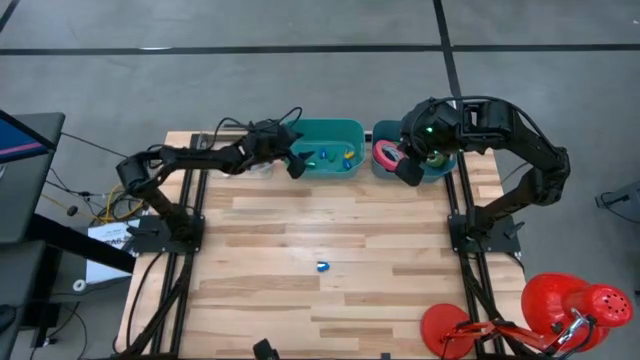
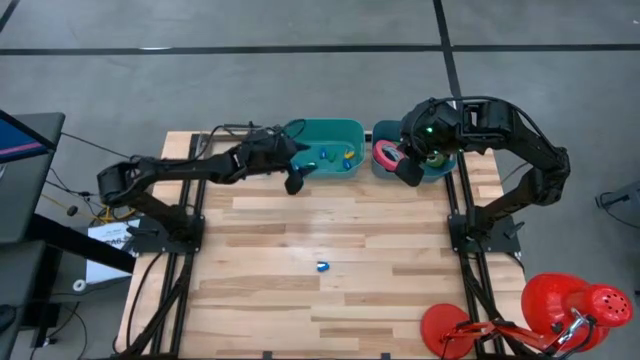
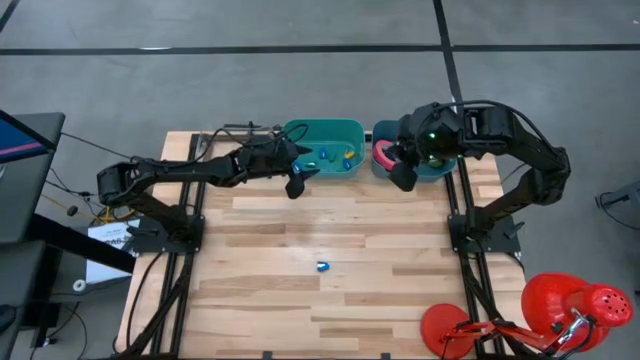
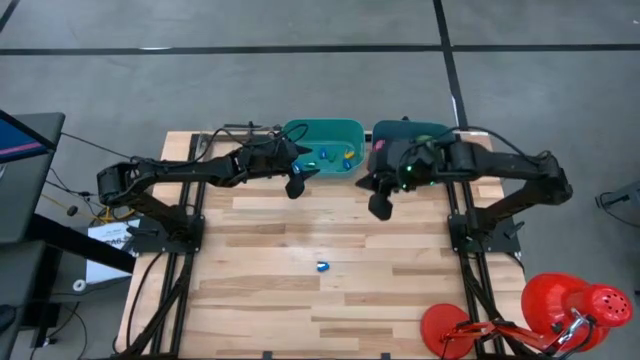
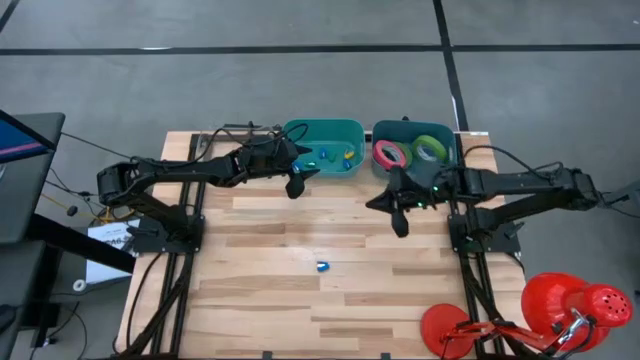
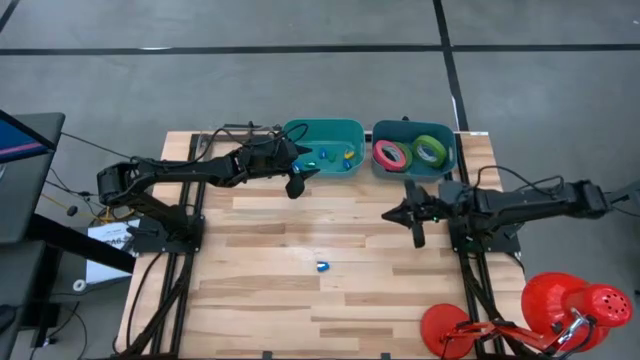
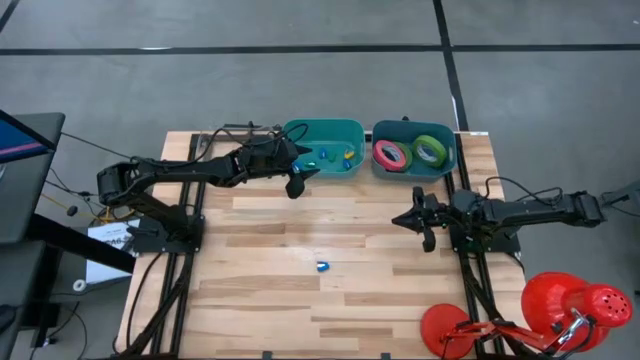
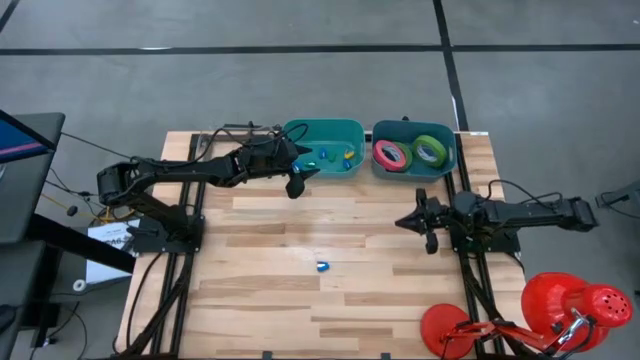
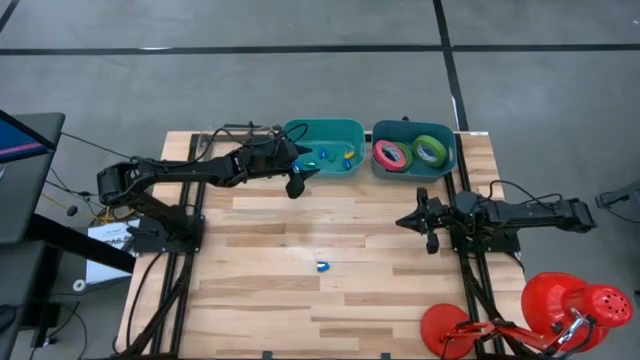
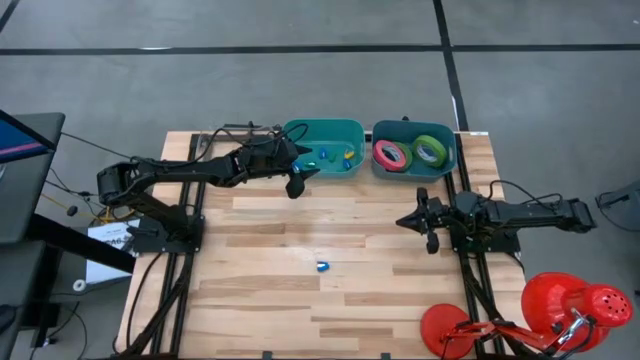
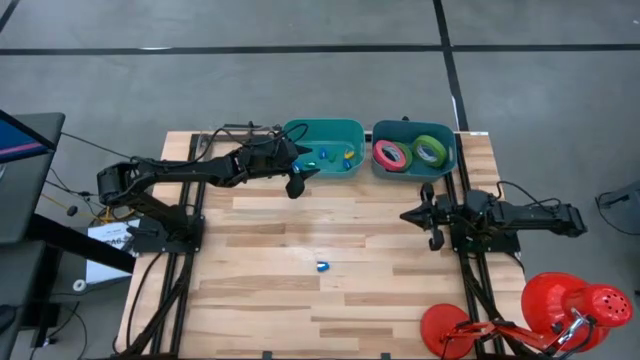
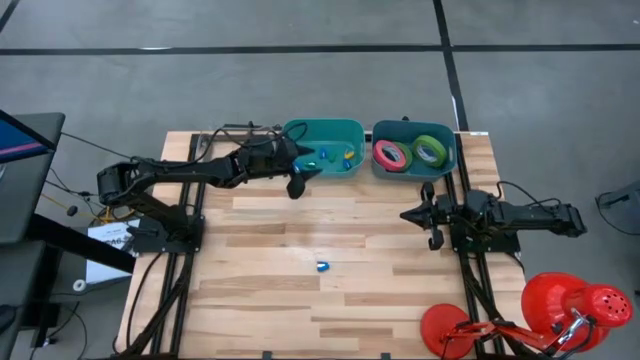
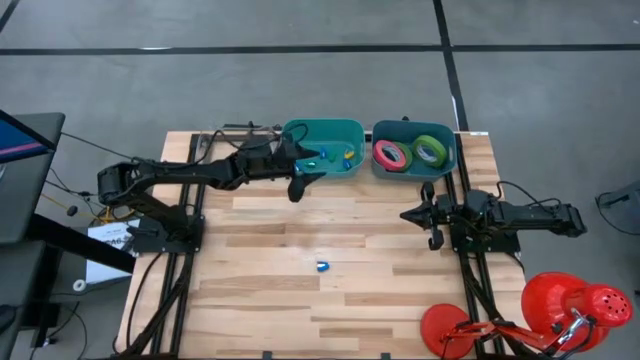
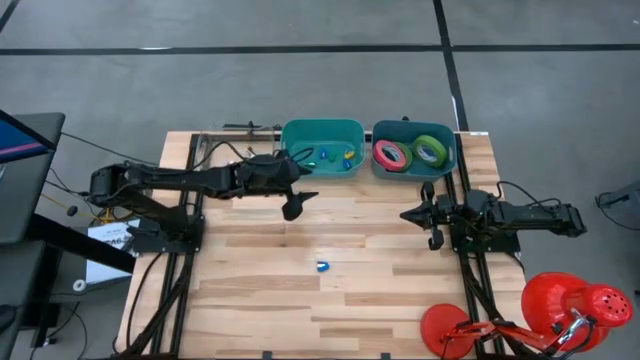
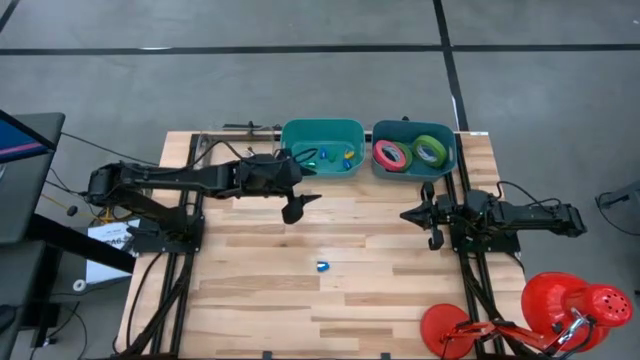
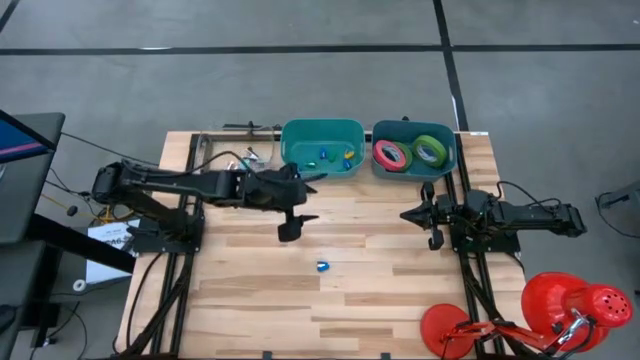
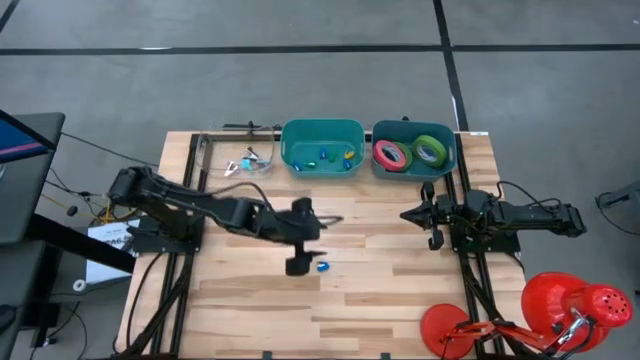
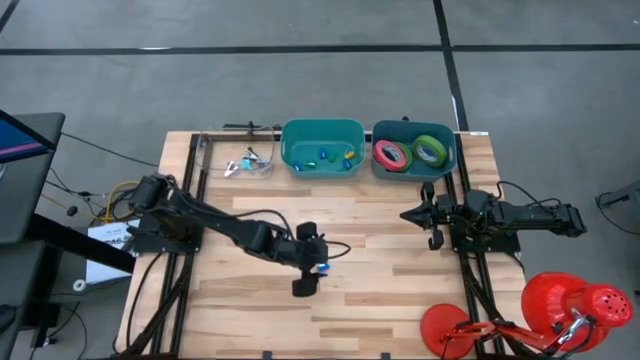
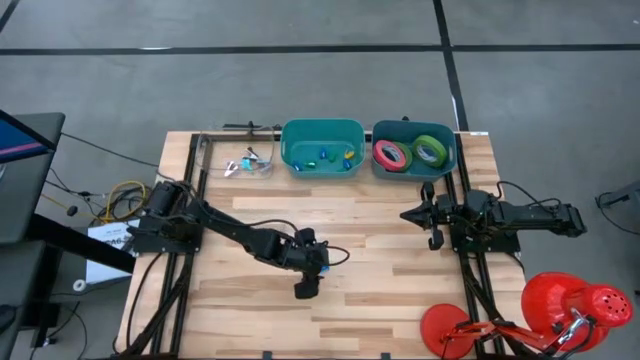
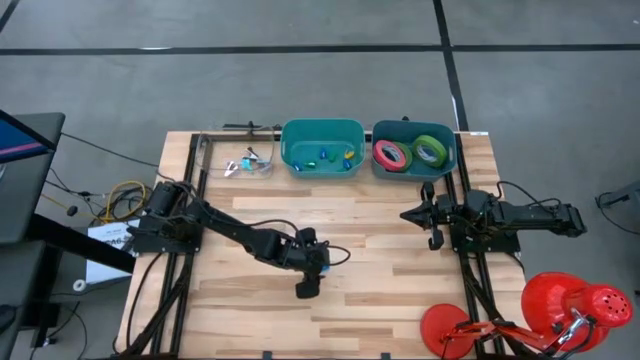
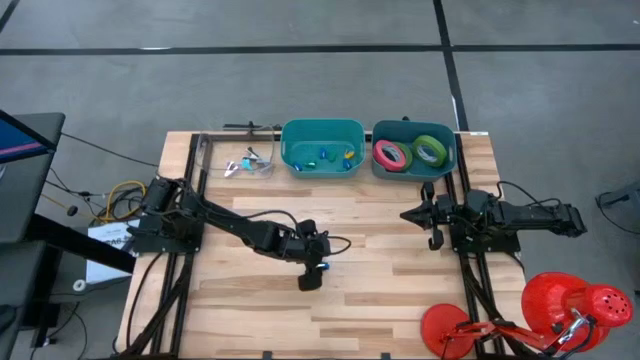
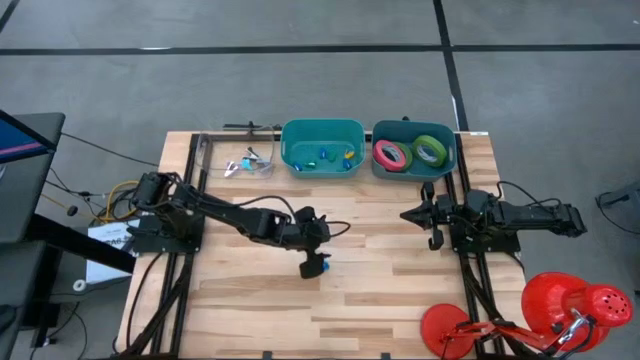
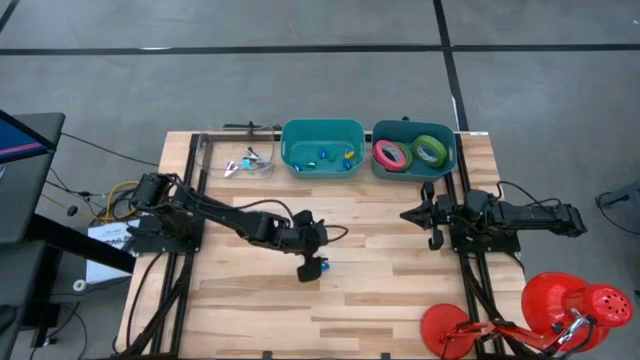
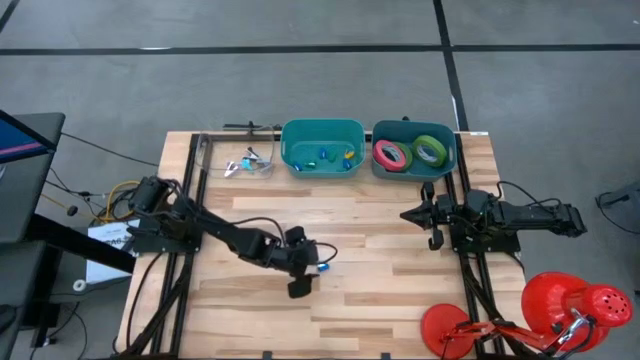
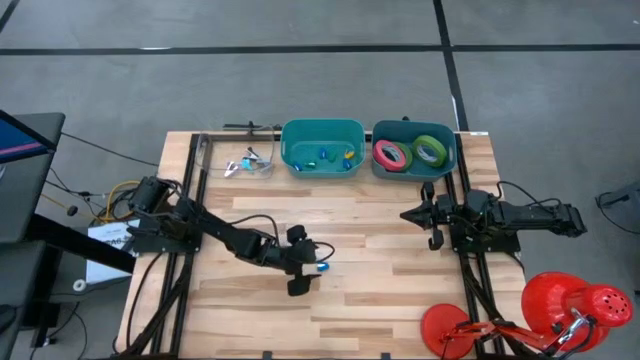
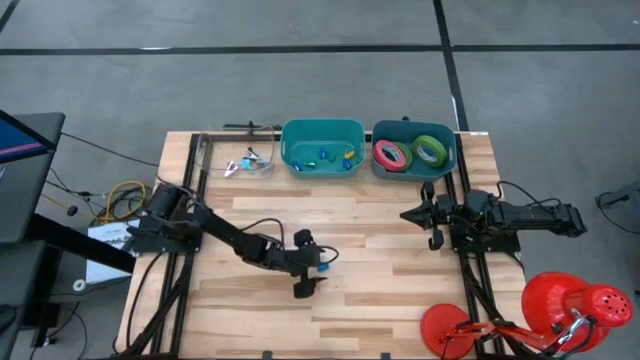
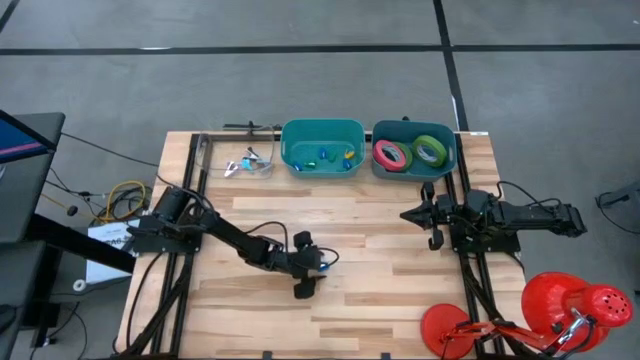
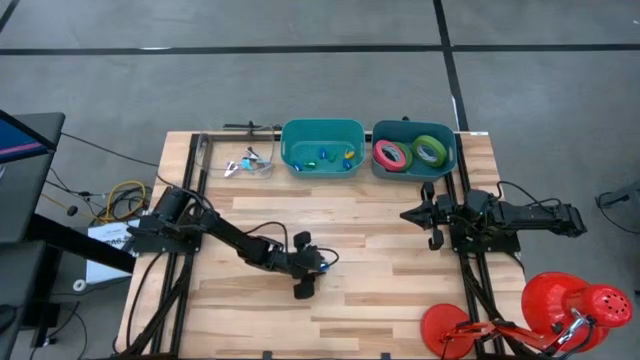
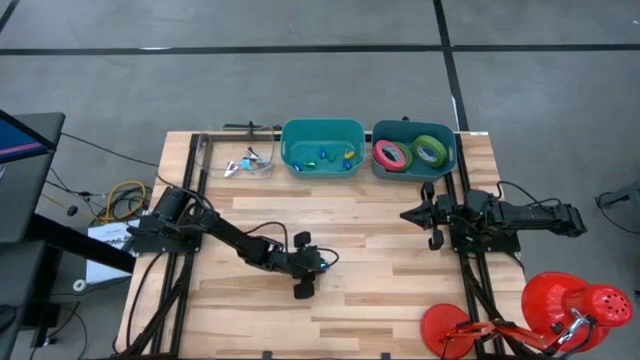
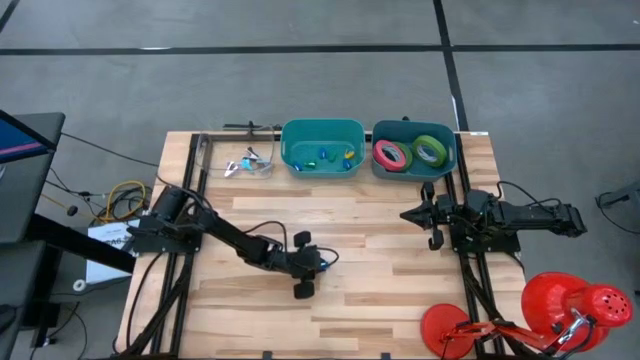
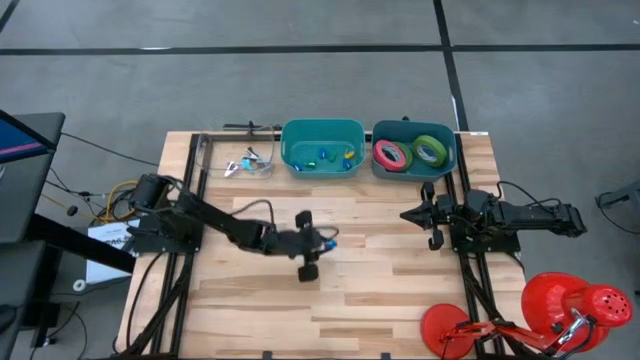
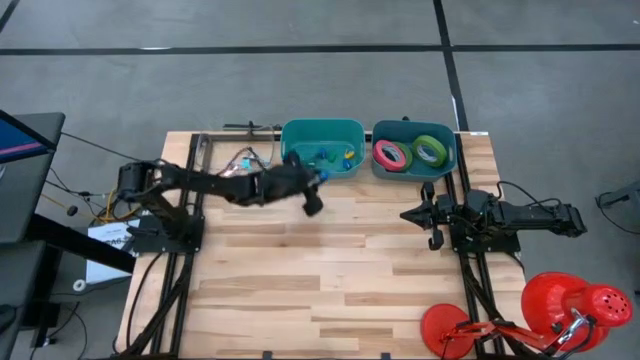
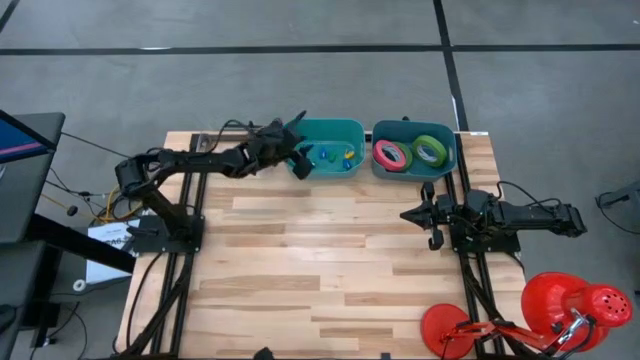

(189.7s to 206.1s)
Task: Pick and place Stapler, Stapler remover, tape
Put the blue stapler into the green bin
